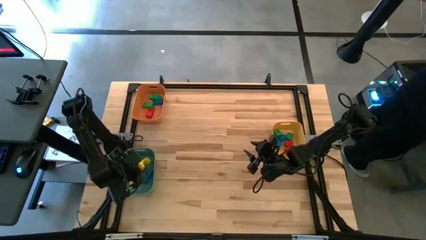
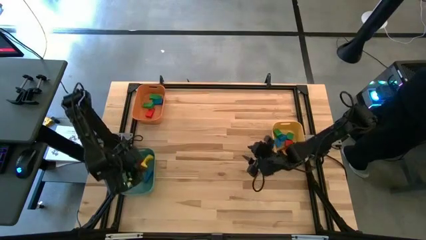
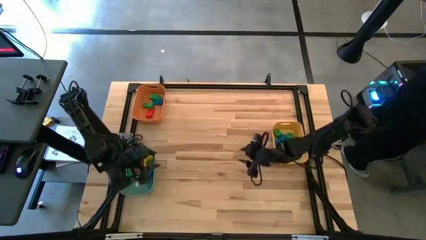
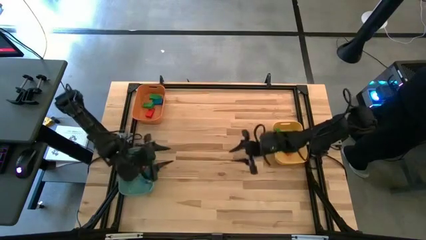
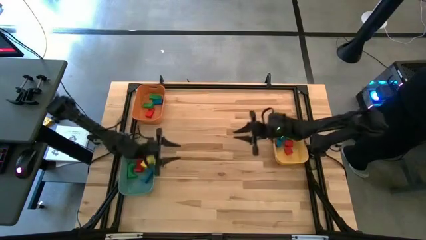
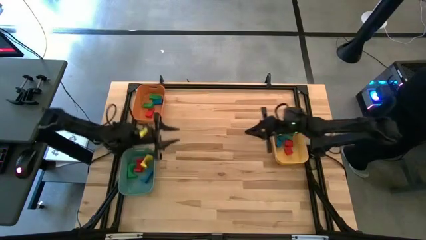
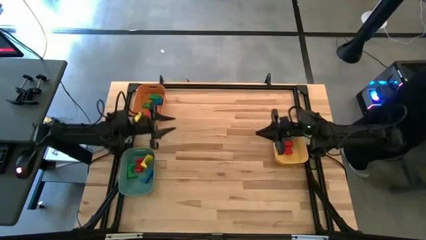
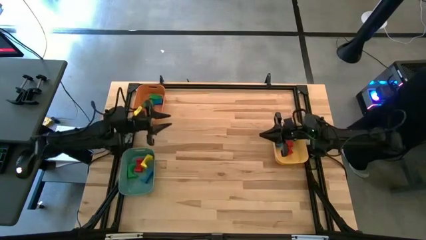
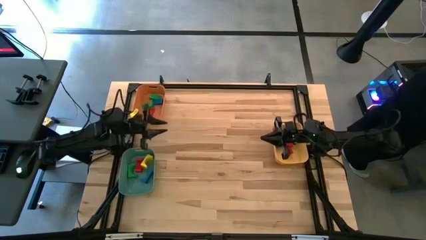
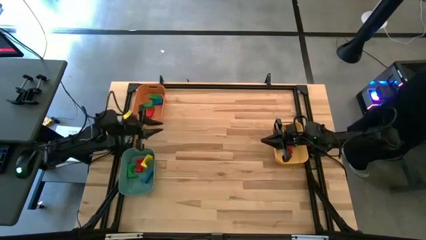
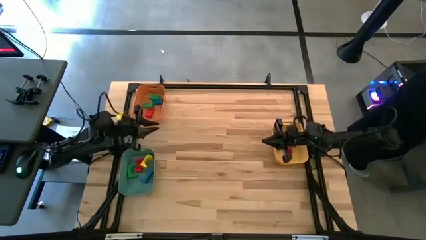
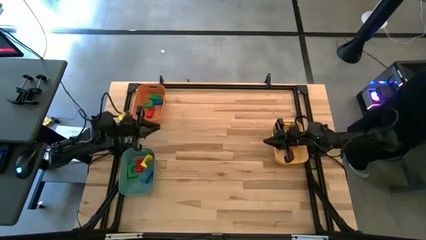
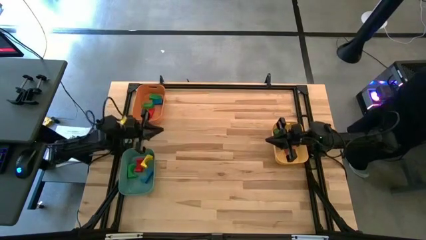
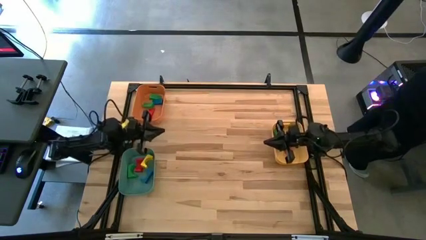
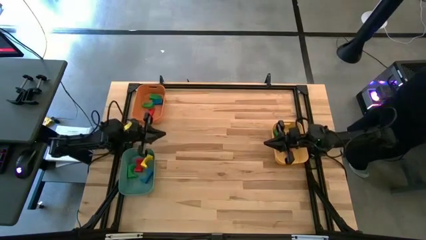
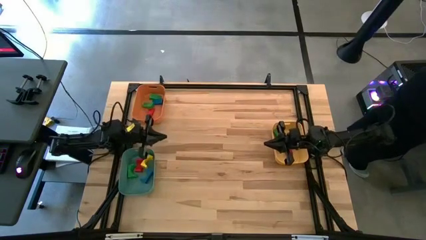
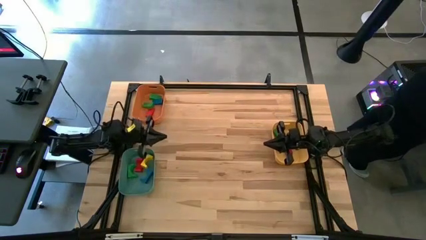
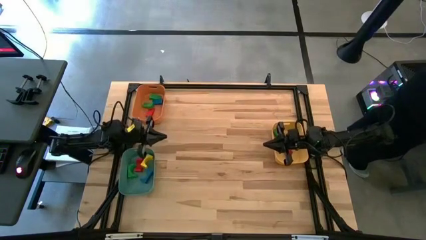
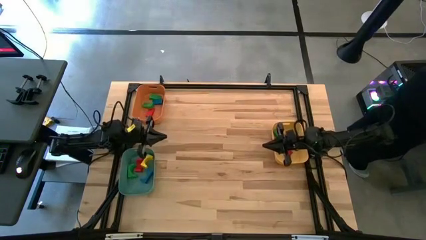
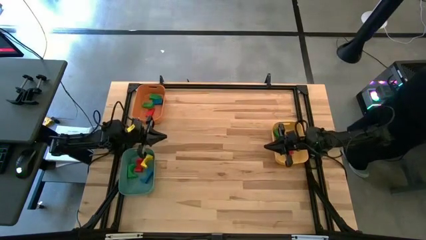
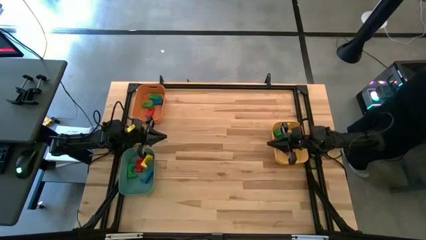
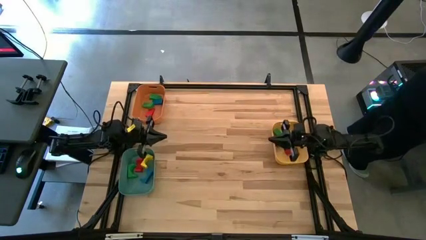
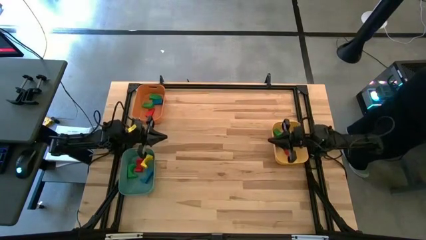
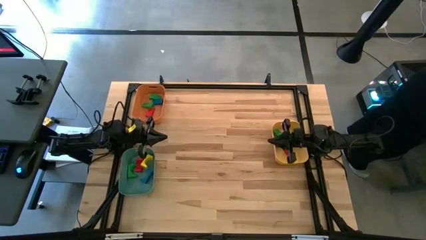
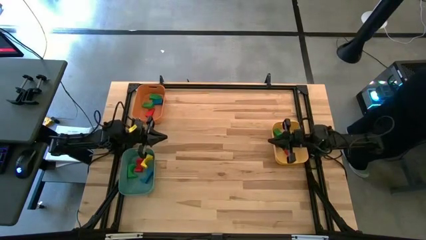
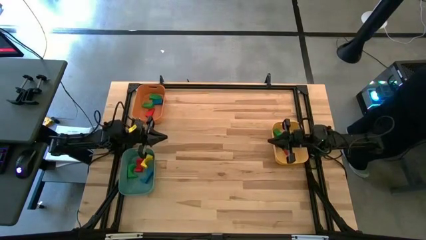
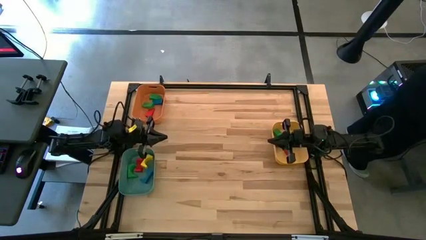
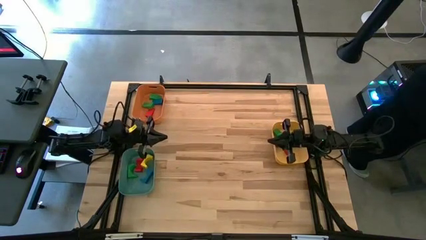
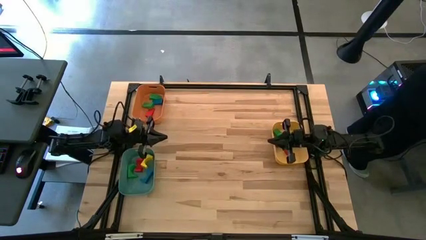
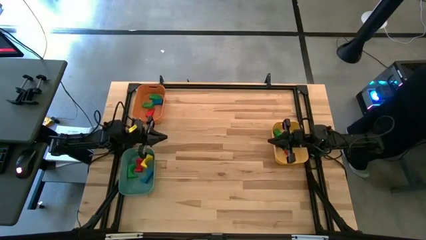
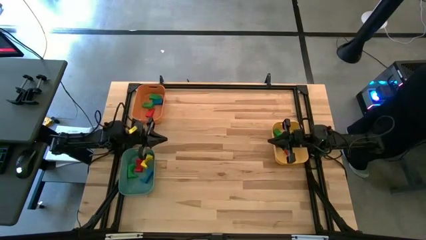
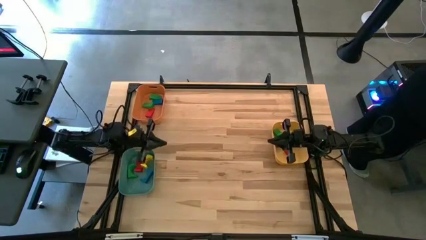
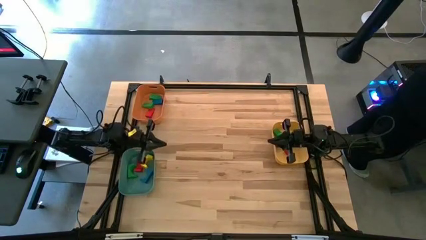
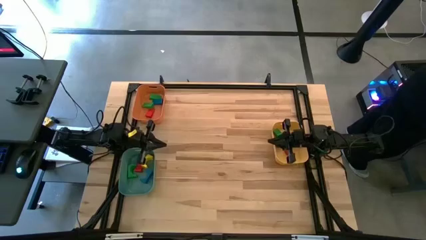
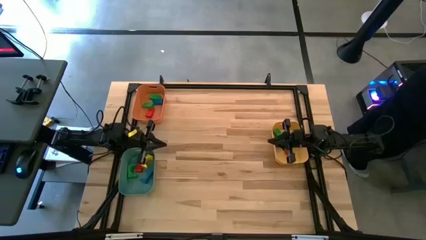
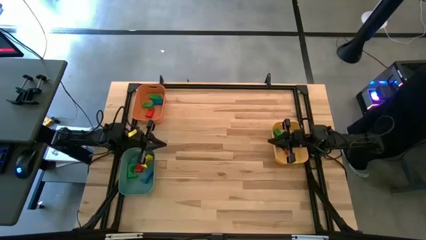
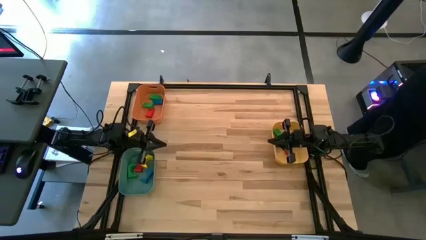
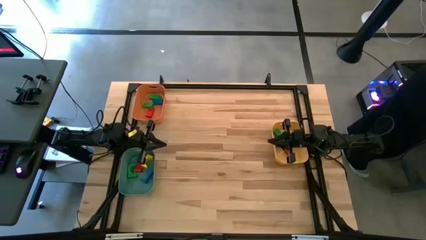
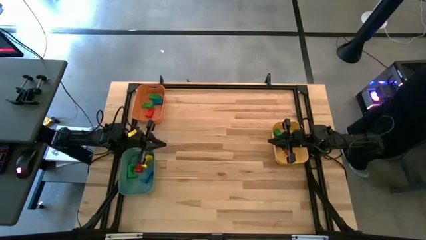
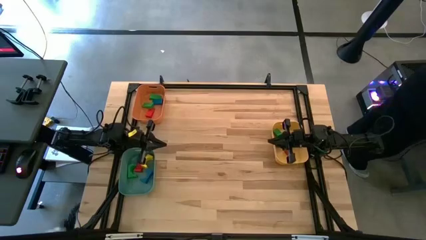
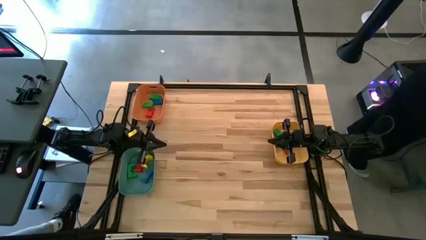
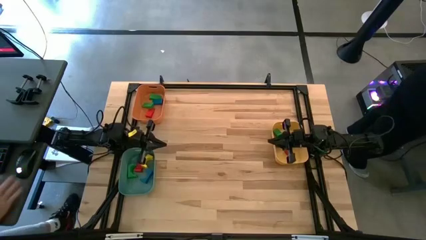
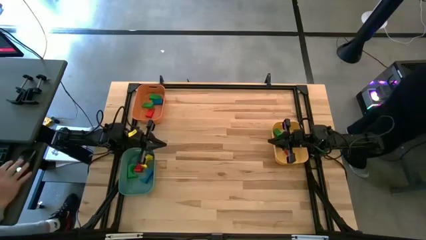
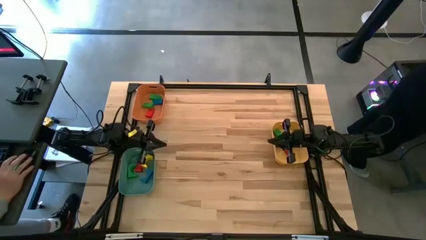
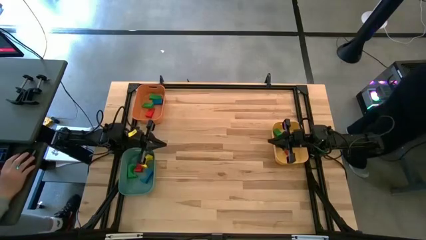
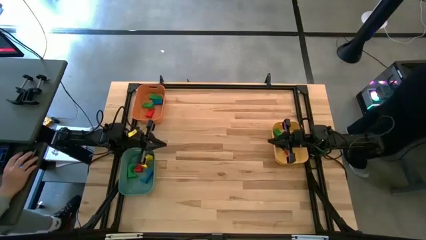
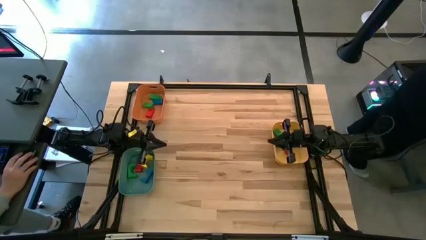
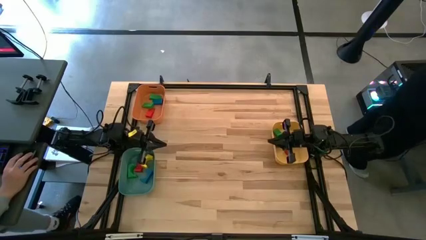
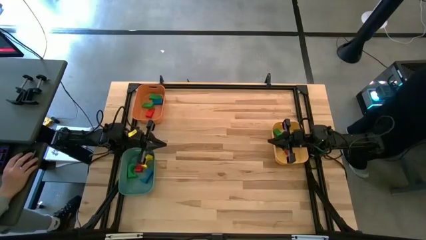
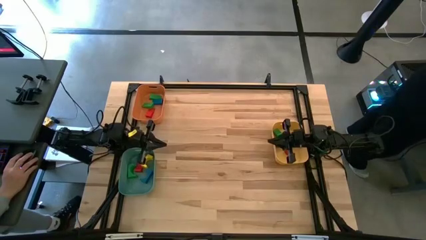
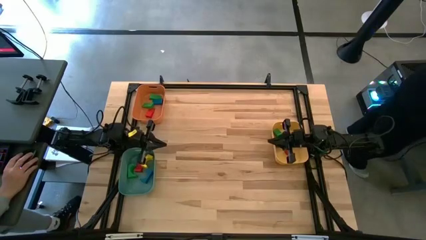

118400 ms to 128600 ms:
Task: Sort blocks by size
Return to Home Position

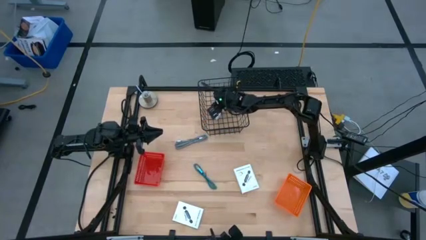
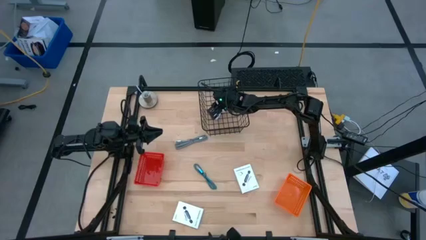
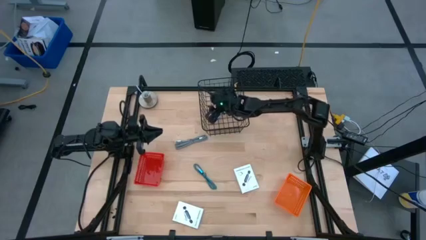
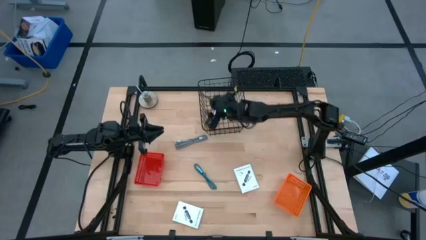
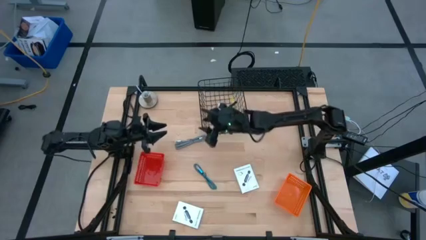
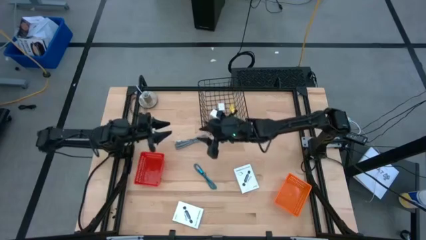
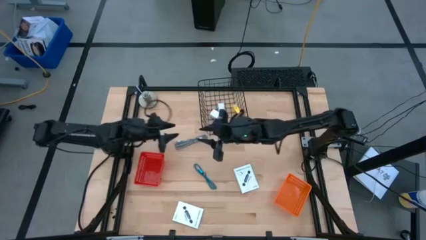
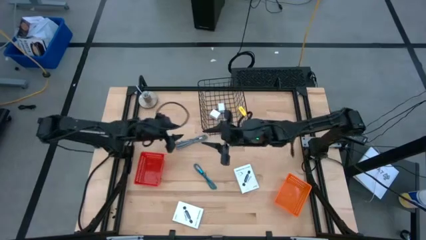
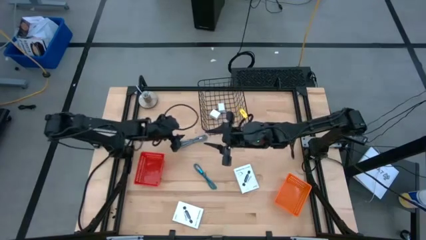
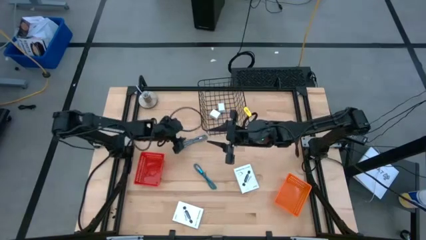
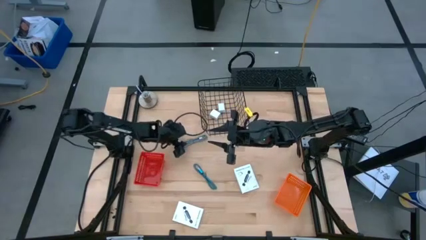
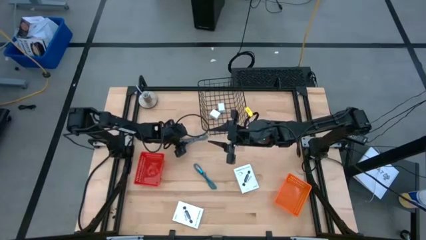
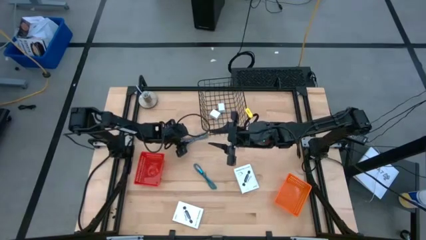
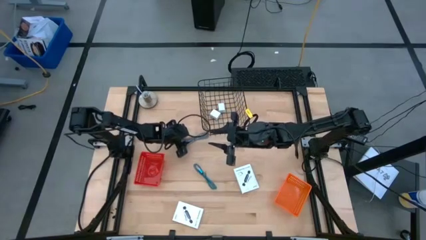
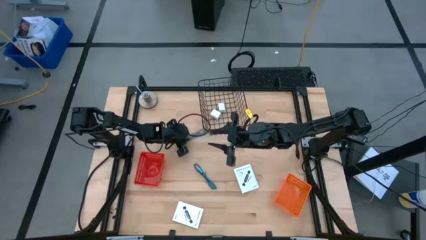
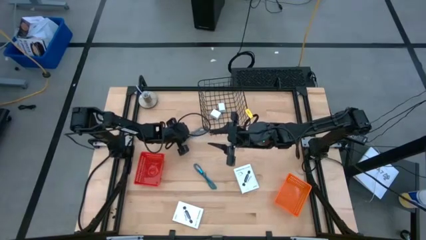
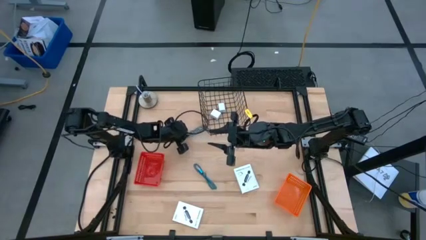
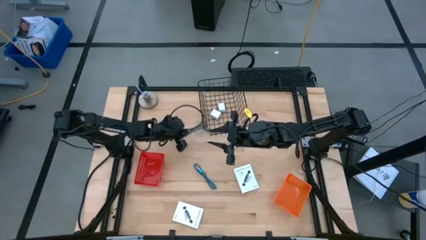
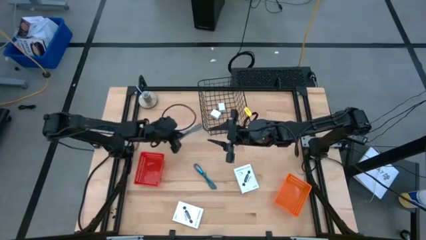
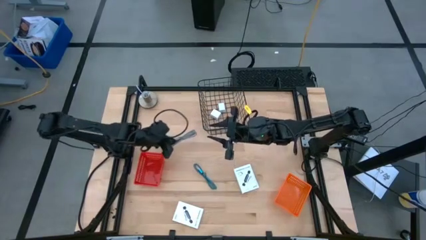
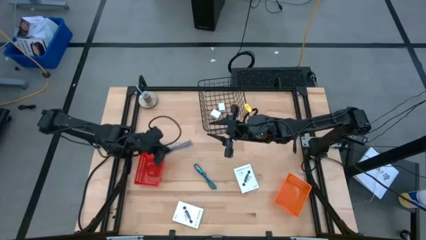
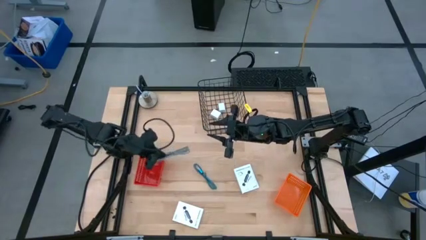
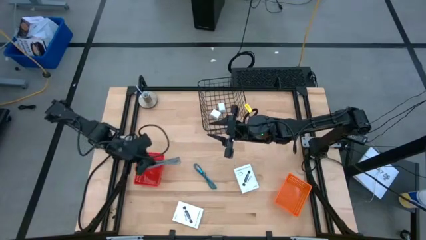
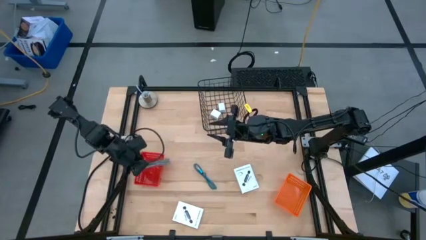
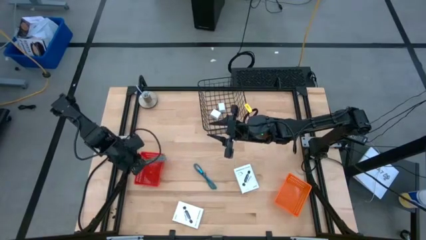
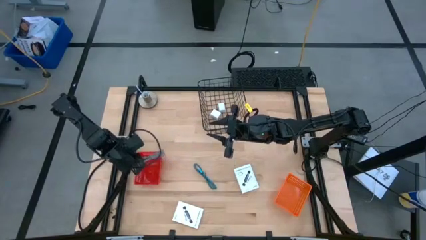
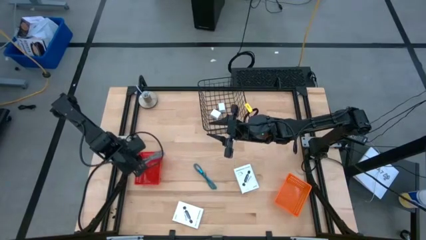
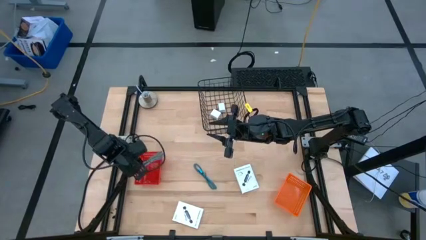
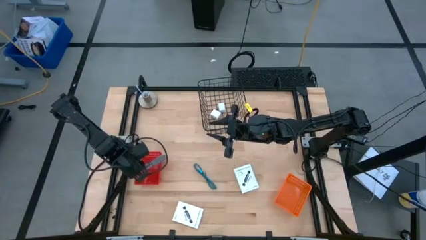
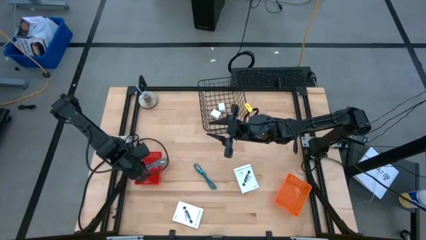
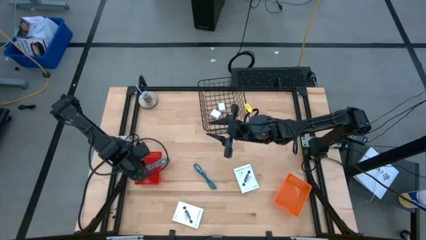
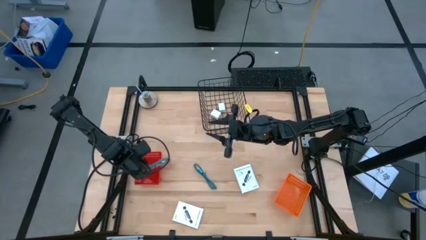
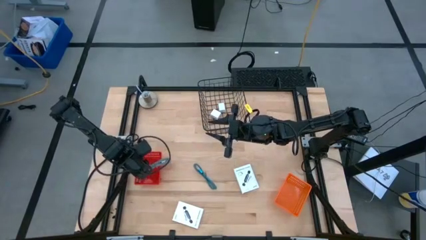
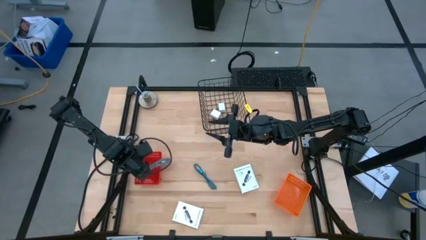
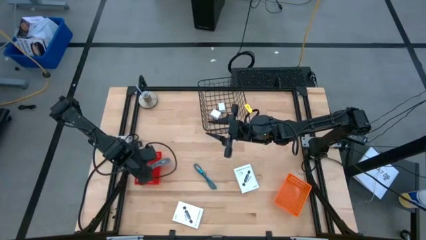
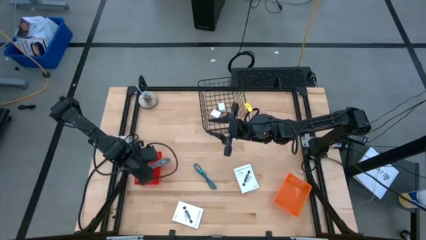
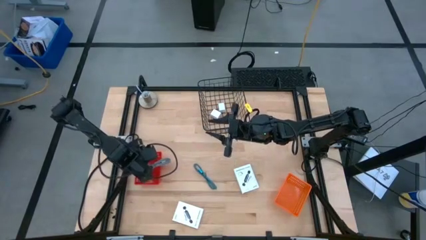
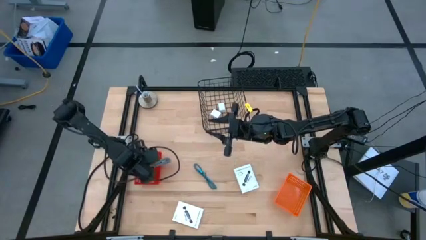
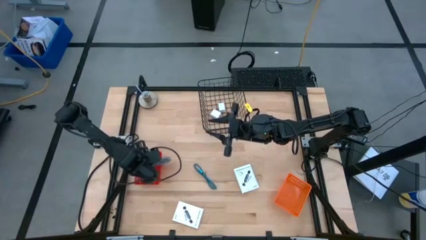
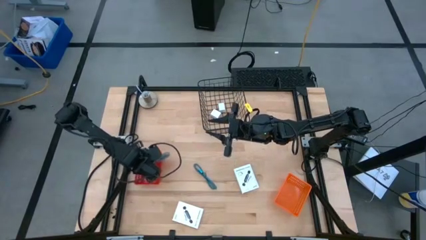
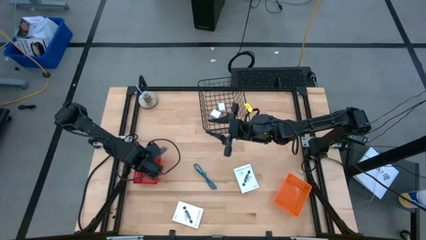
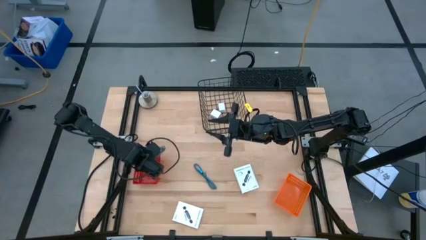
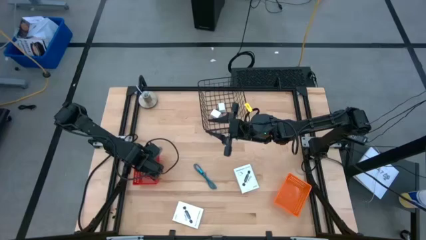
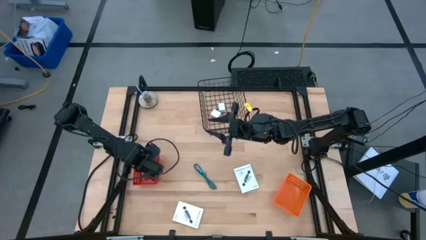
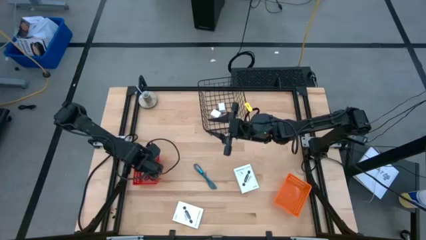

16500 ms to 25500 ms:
Task: Pick and place items into bin
Put the white black striped charger wire into the red basket
